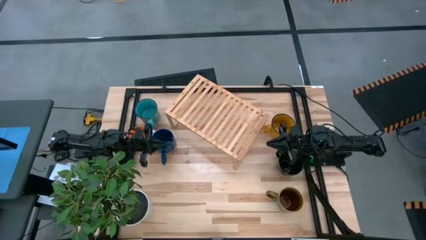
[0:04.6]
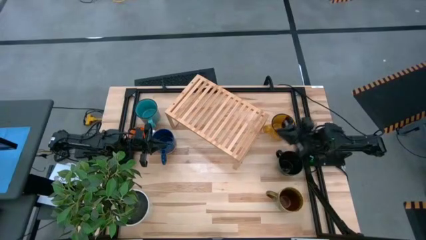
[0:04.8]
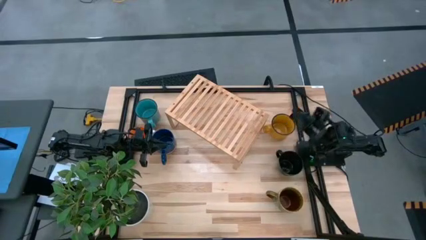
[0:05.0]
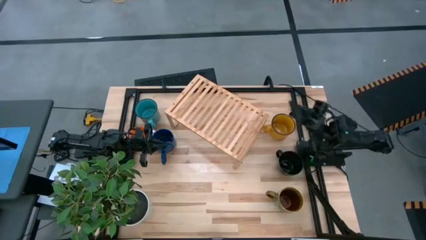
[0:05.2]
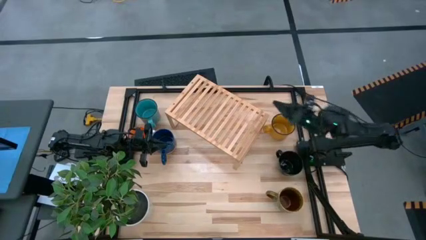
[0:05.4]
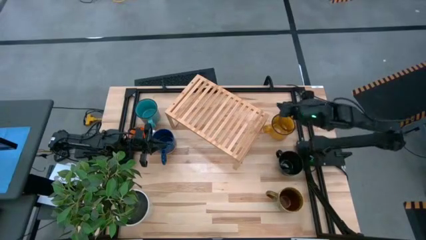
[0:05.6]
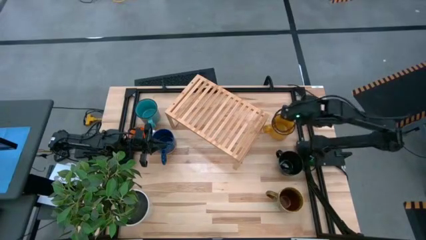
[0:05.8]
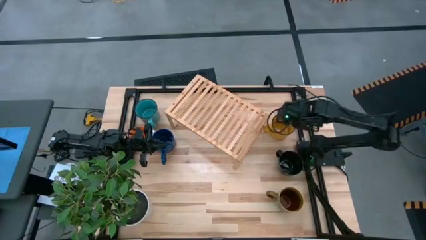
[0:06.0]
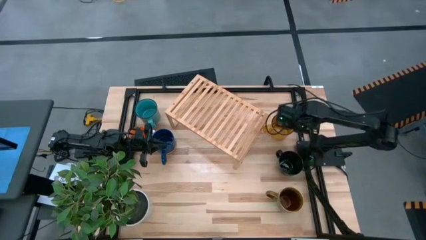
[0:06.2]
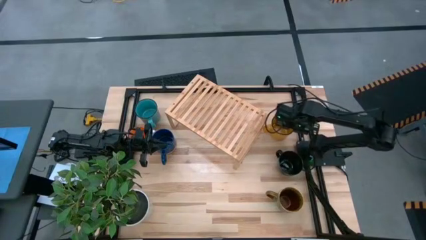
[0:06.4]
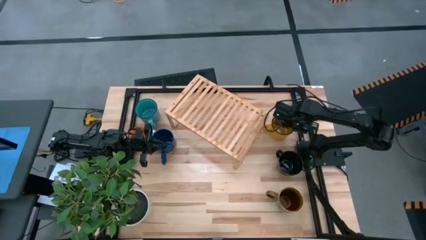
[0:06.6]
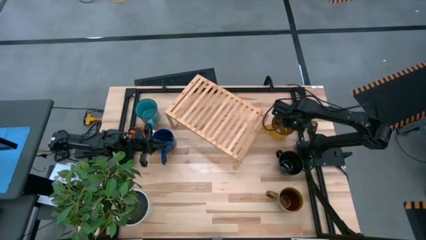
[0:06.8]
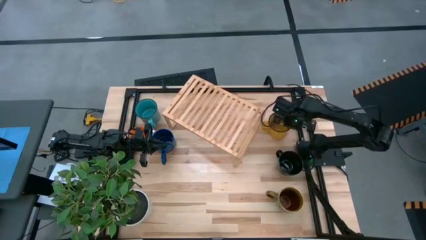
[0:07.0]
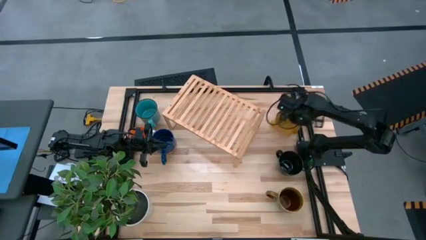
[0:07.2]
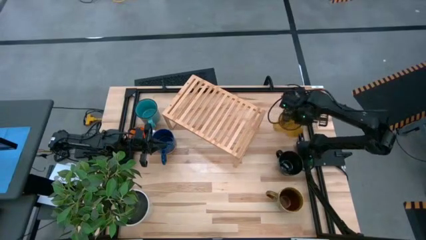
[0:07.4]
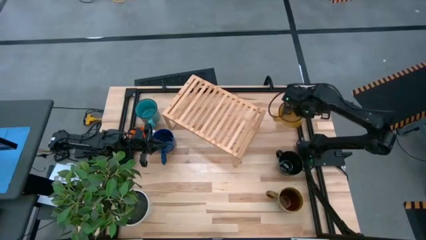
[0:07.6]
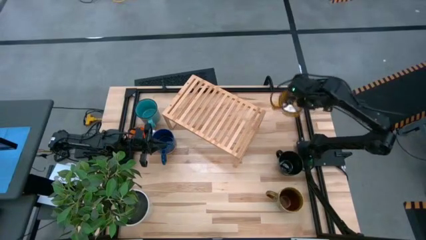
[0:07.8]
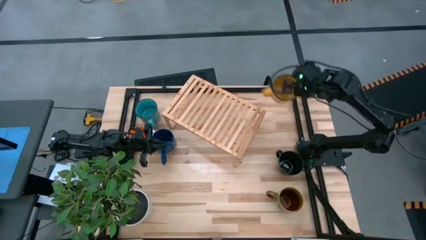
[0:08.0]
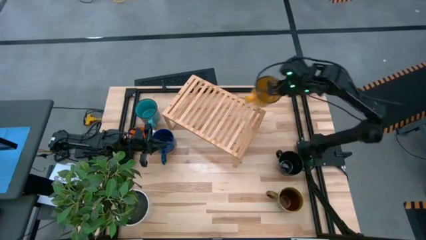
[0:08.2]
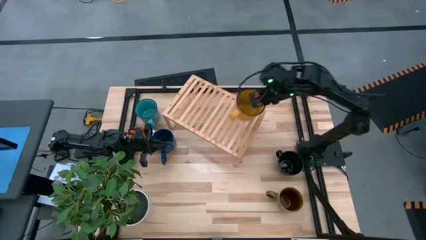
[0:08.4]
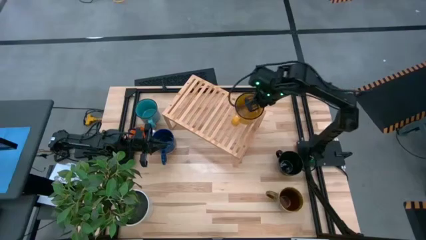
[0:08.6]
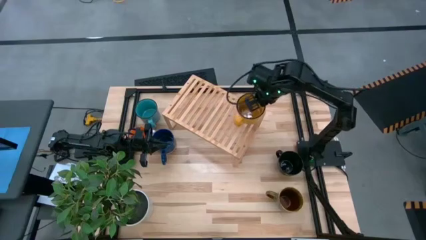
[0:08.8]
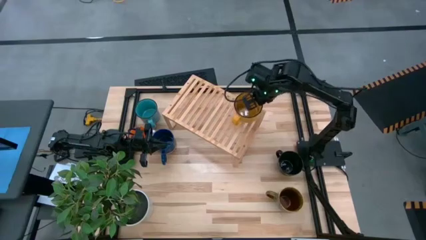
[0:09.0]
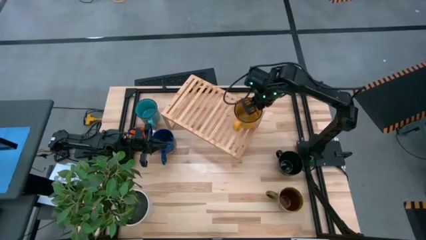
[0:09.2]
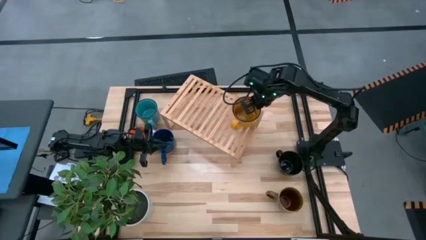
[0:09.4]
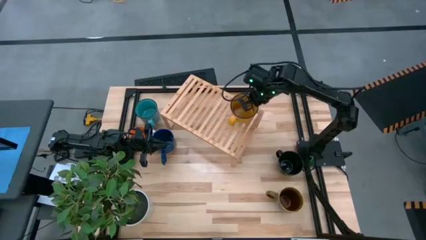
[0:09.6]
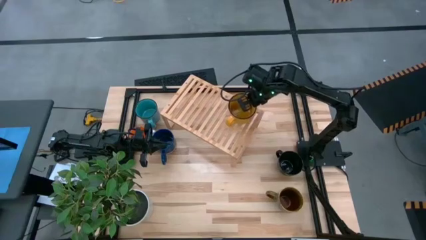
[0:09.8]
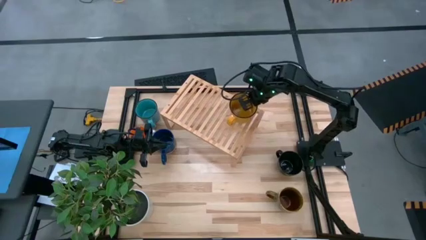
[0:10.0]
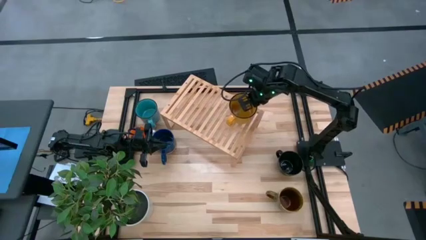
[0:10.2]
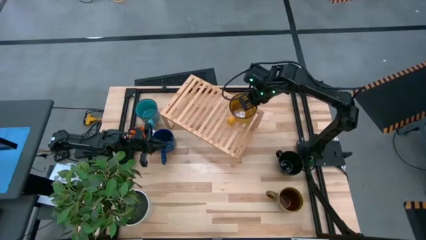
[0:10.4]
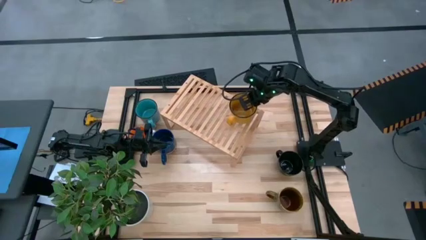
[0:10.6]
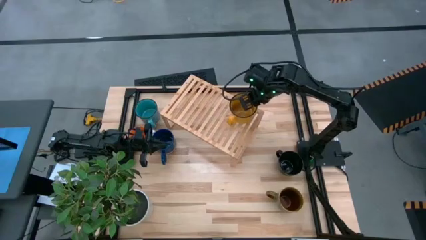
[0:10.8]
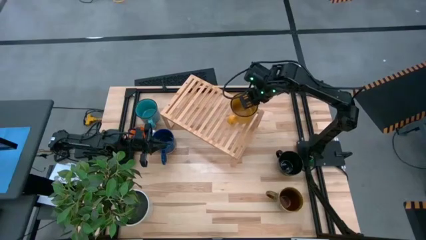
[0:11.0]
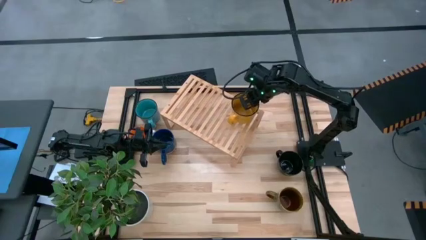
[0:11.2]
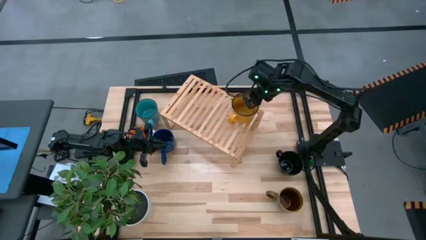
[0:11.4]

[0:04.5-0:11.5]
Task: Place coffee mugs
Put the yellow mug on the shelf

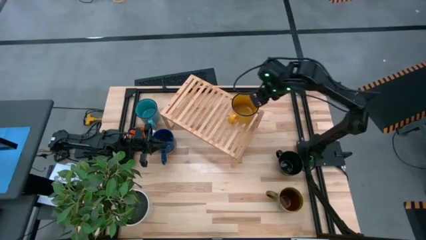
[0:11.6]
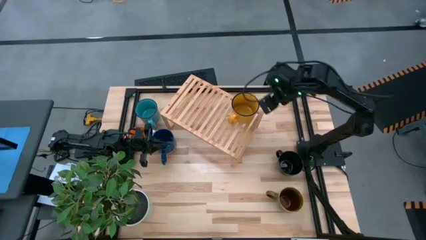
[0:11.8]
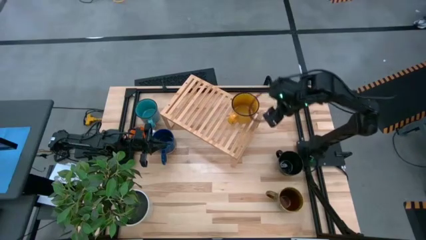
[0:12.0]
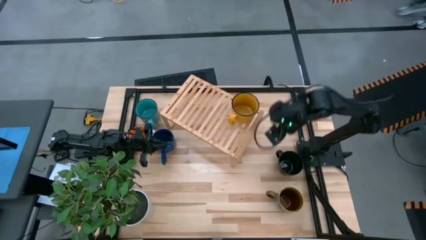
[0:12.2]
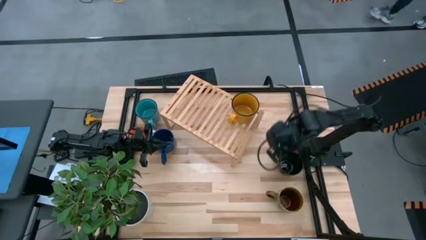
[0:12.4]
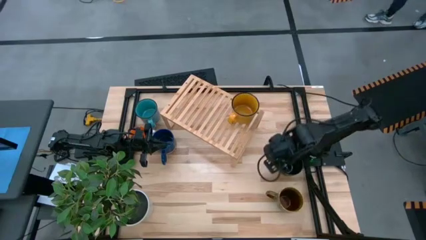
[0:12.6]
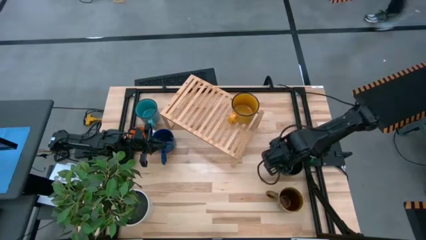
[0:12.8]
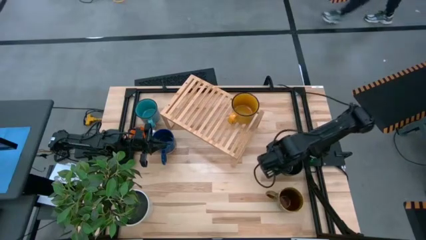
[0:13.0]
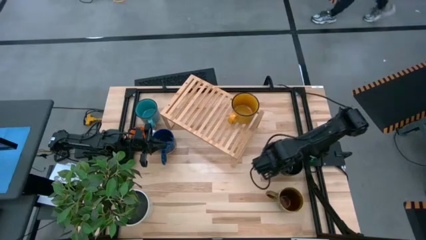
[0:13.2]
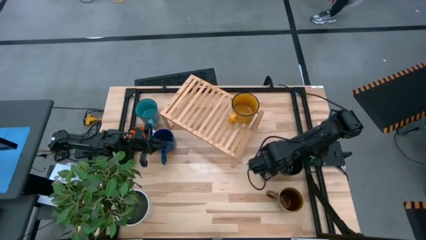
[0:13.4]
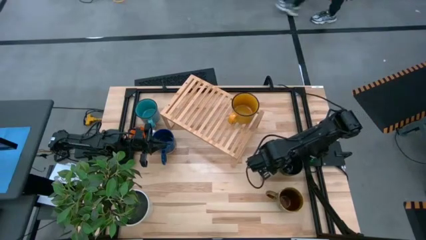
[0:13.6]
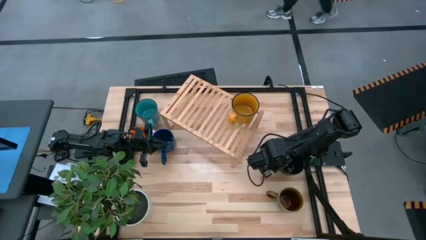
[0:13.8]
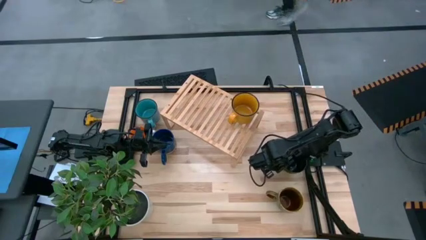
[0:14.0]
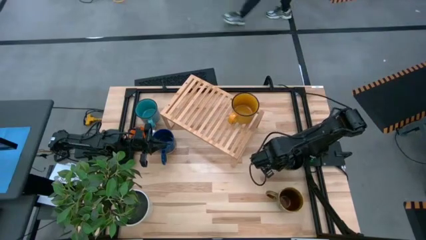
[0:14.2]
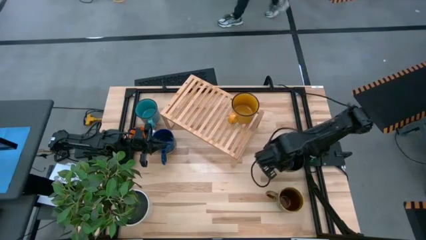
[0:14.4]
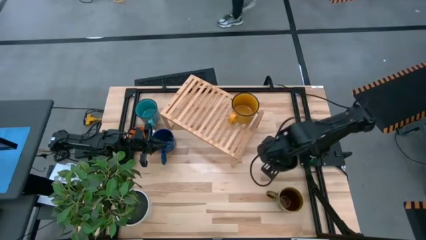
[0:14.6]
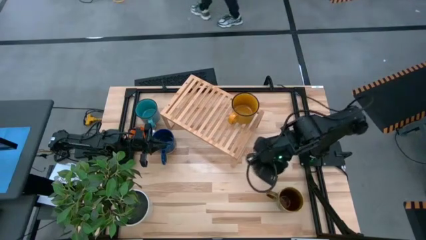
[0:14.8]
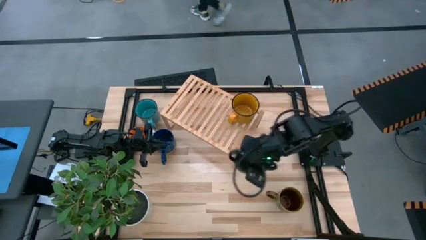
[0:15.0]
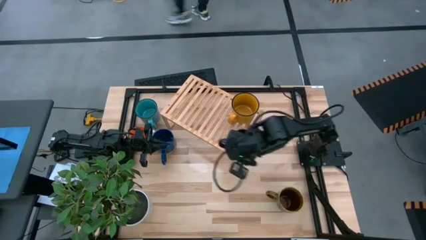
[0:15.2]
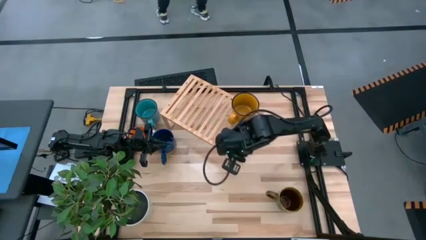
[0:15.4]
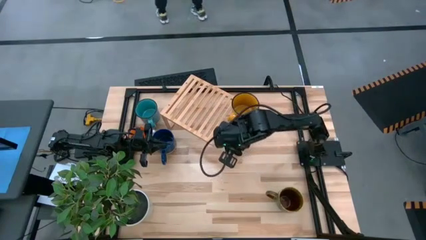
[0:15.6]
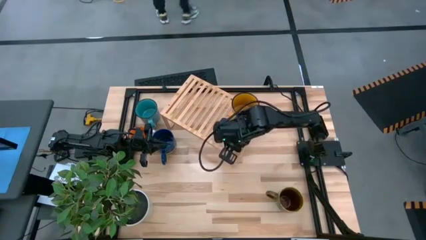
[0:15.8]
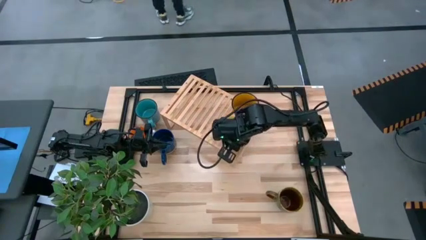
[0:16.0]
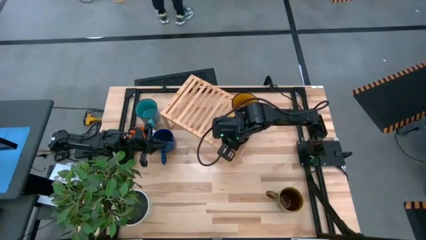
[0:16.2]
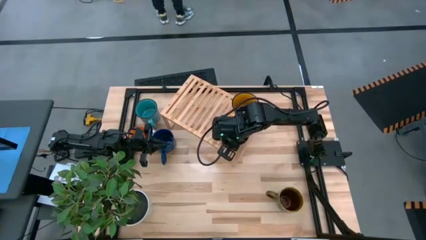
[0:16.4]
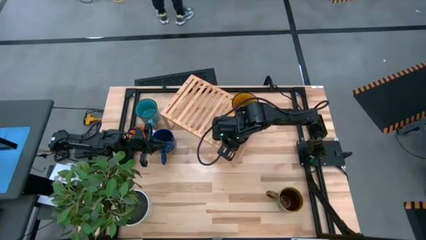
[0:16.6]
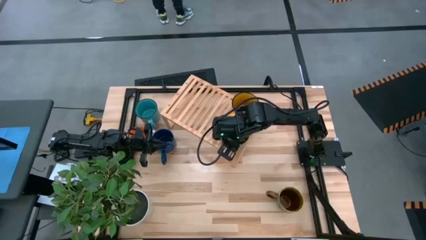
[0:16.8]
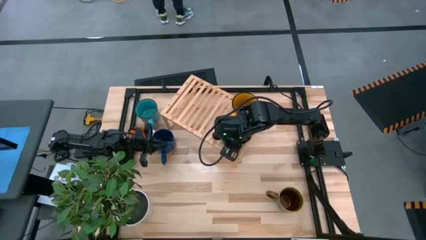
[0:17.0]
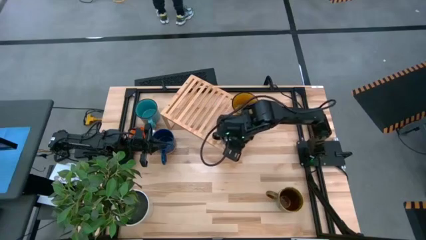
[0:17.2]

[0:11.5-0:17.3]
Put the black mug on the shelf

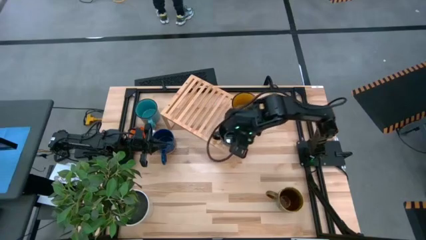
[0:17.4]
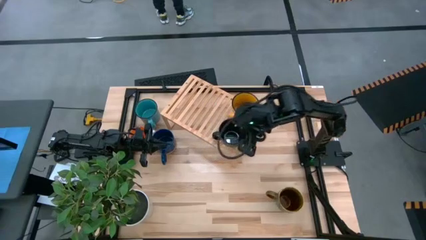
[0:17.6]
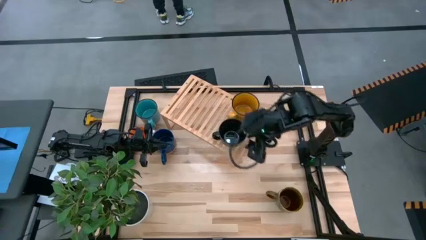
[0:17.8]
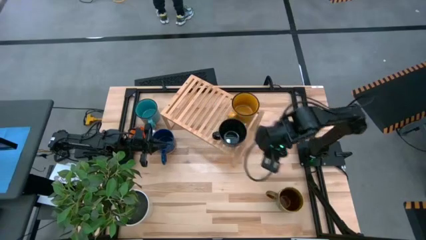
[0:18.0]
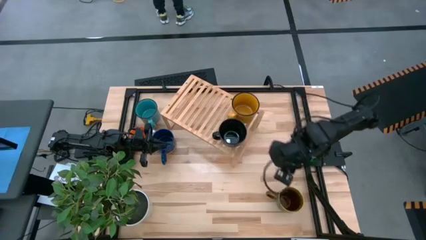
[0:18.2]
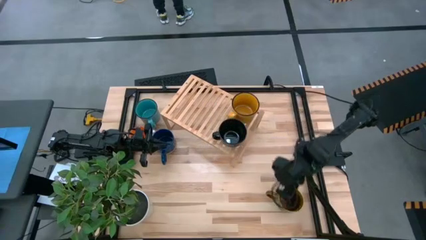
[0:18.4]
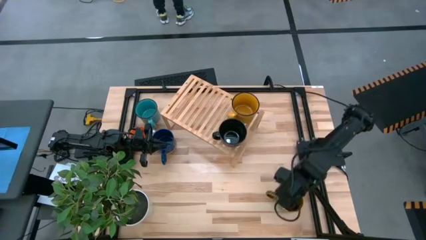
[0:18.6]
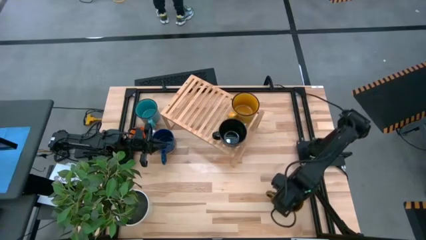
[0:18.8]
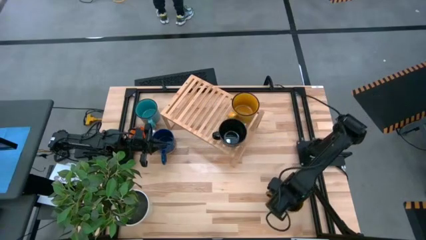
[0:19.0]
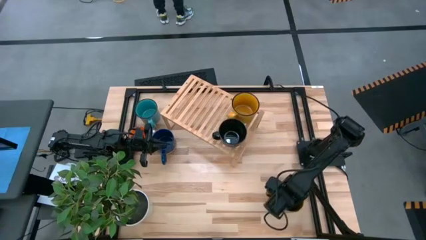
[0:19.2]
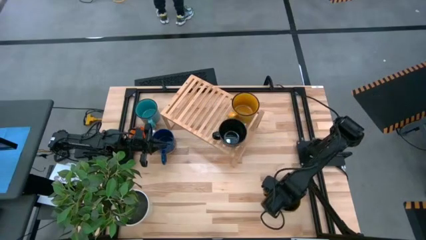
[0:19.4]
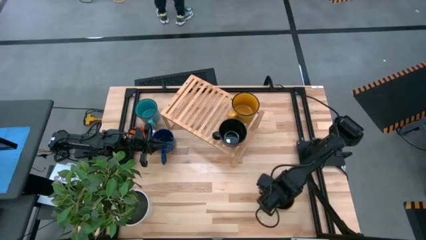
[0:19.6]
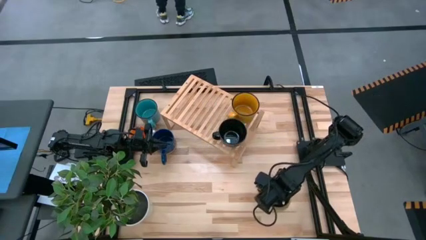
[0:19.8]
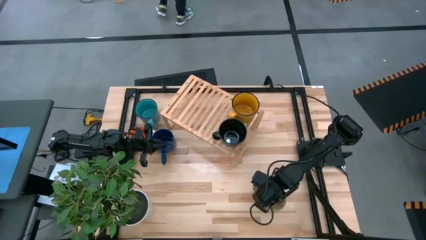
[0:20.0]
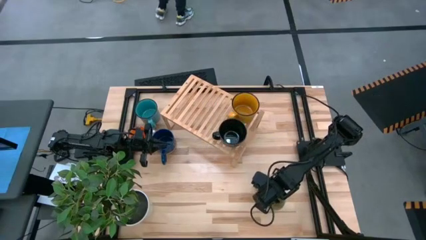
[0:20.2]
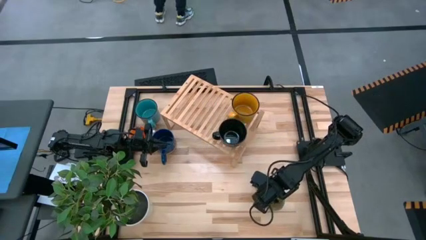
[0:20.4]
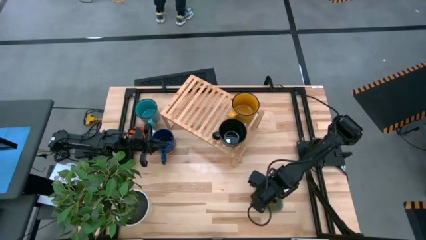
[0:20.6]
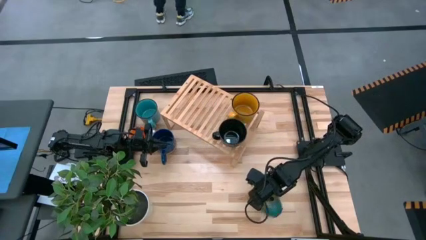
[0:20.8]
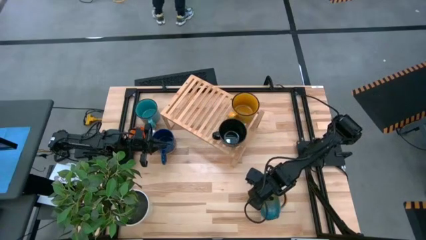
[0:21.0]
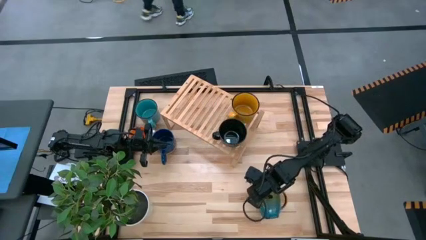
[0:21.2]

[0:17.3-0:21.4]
Put the blue- green mug on the shelf
